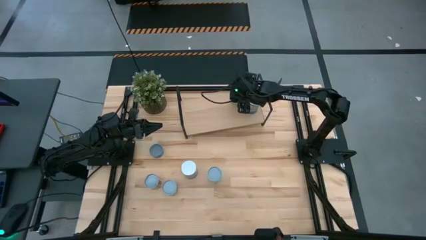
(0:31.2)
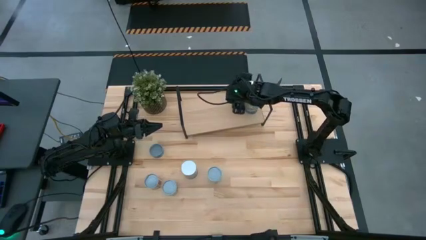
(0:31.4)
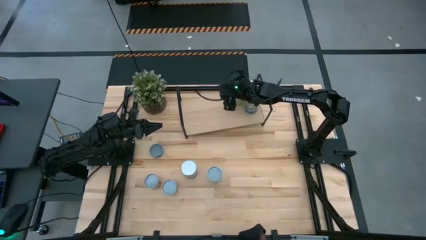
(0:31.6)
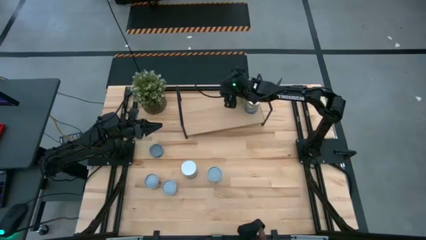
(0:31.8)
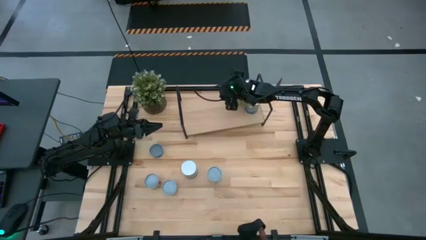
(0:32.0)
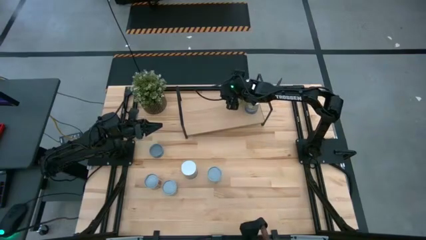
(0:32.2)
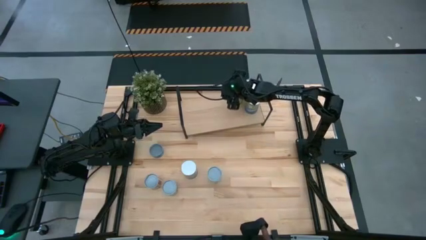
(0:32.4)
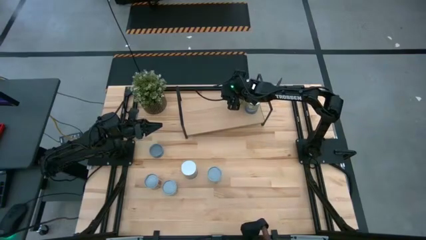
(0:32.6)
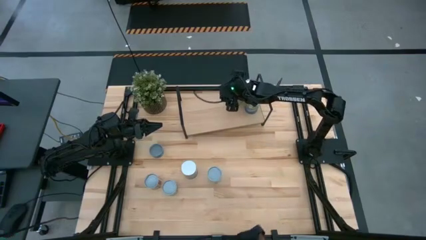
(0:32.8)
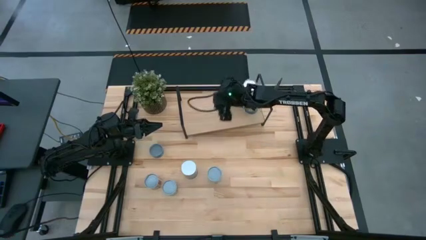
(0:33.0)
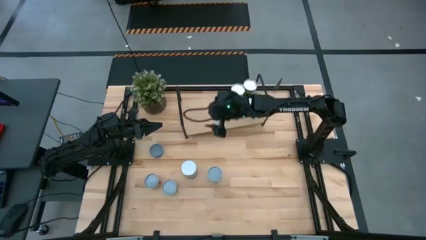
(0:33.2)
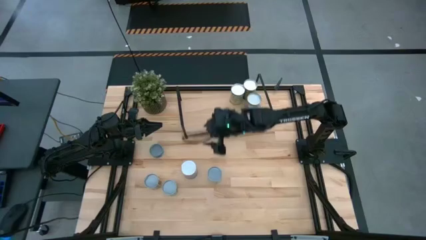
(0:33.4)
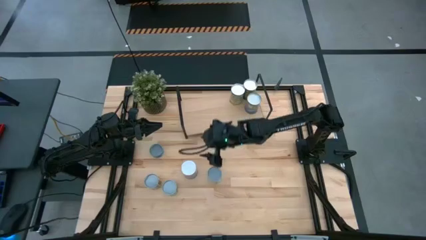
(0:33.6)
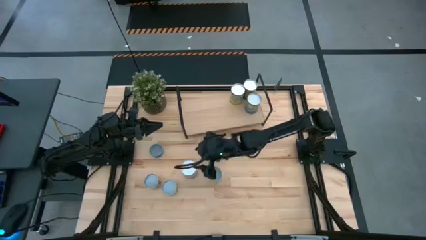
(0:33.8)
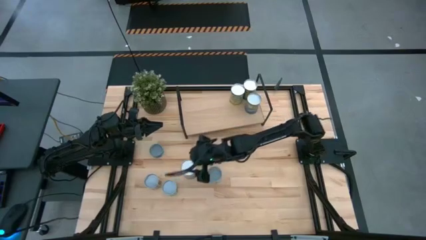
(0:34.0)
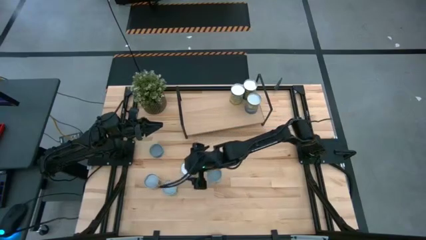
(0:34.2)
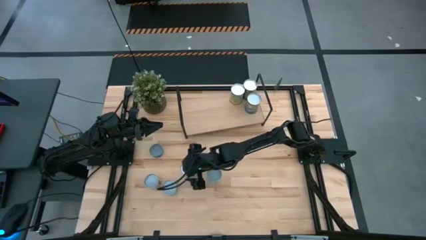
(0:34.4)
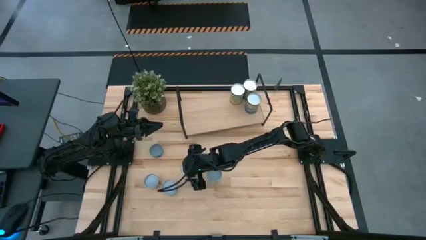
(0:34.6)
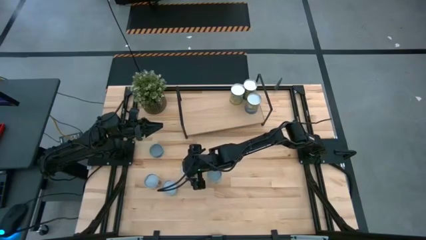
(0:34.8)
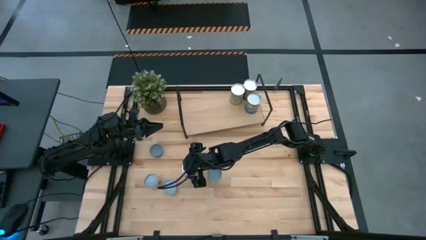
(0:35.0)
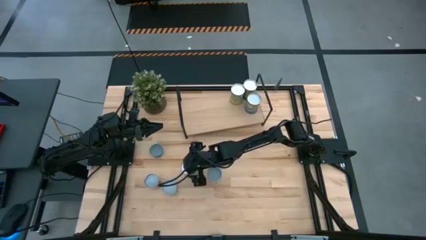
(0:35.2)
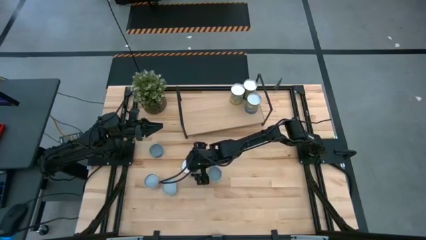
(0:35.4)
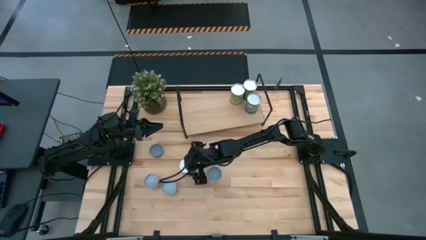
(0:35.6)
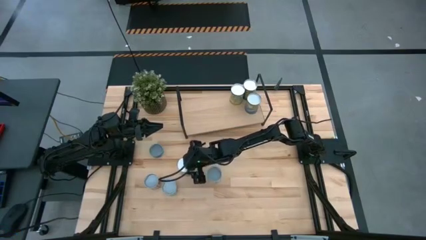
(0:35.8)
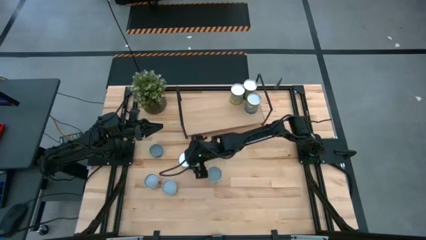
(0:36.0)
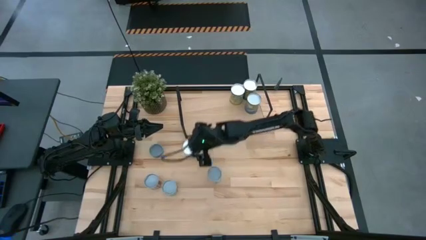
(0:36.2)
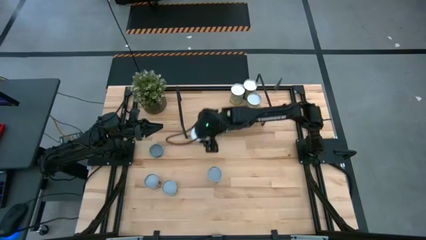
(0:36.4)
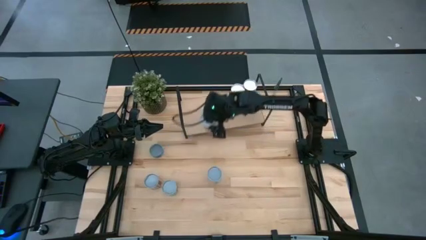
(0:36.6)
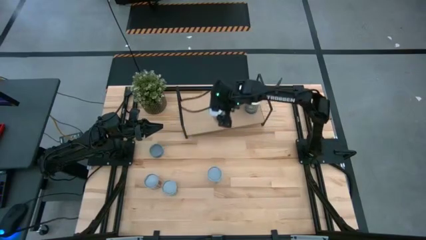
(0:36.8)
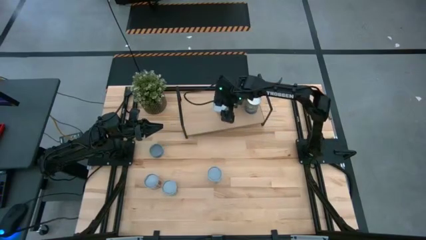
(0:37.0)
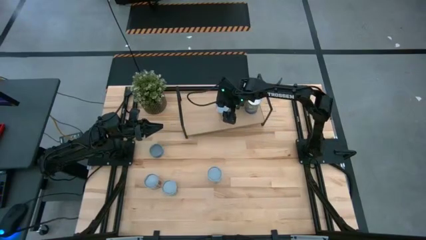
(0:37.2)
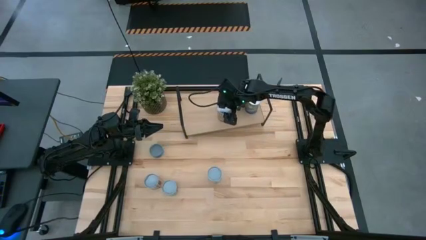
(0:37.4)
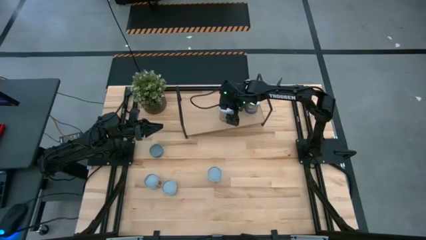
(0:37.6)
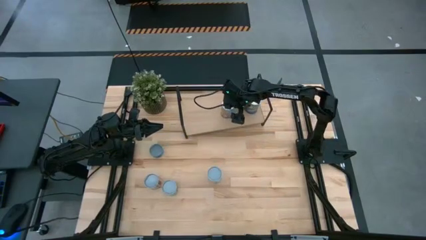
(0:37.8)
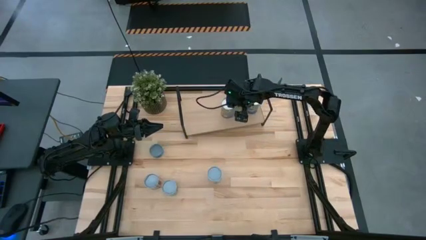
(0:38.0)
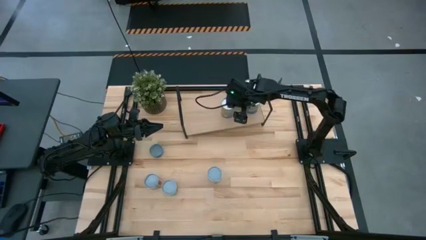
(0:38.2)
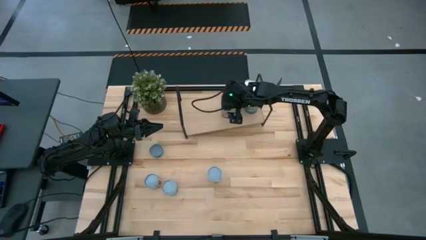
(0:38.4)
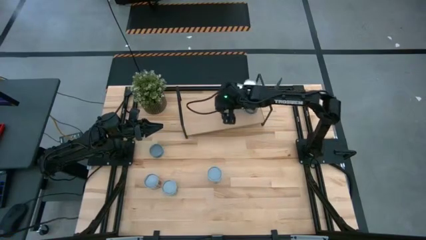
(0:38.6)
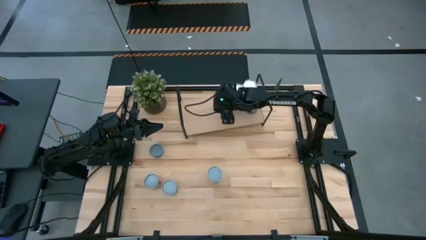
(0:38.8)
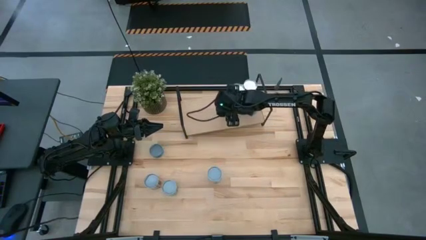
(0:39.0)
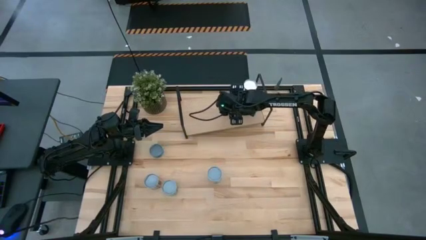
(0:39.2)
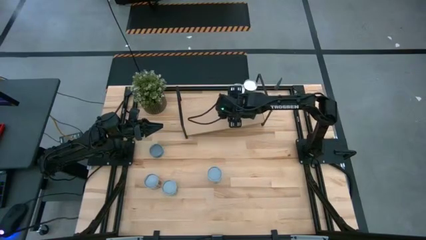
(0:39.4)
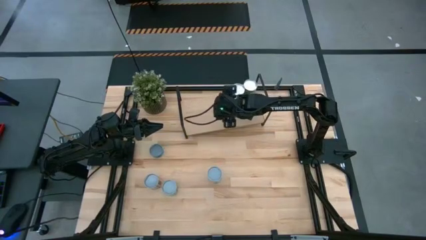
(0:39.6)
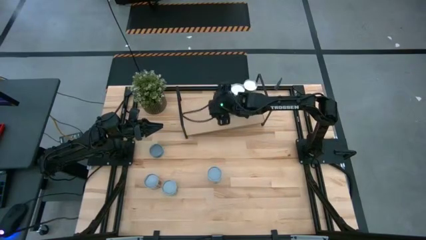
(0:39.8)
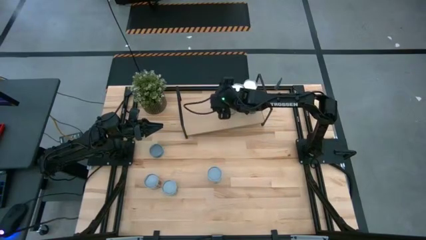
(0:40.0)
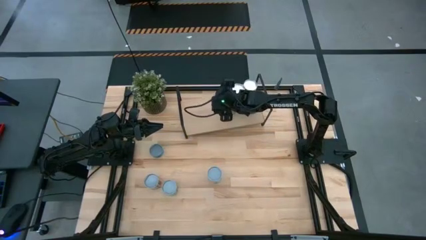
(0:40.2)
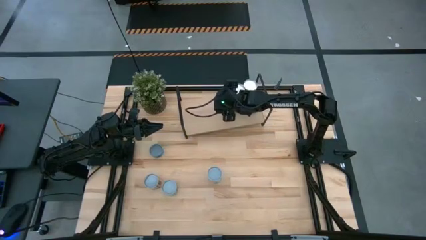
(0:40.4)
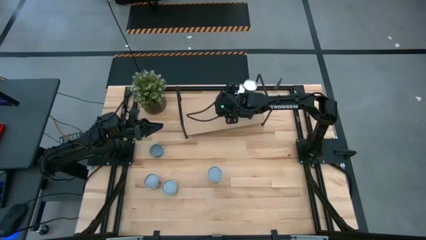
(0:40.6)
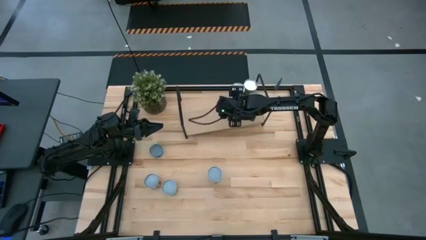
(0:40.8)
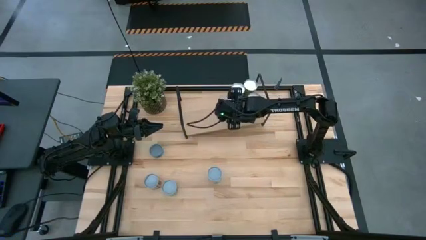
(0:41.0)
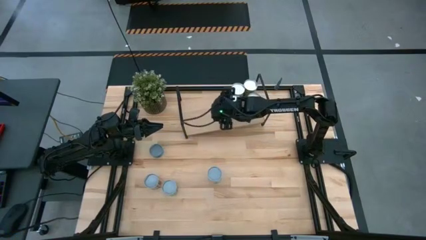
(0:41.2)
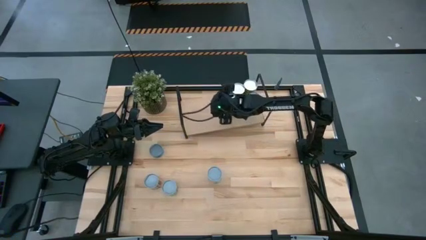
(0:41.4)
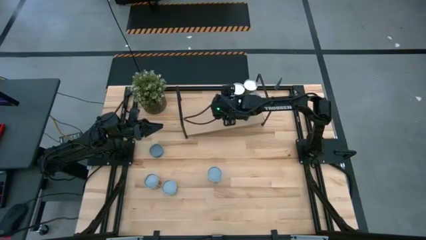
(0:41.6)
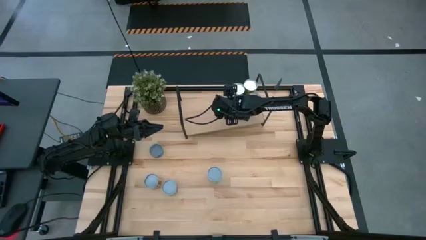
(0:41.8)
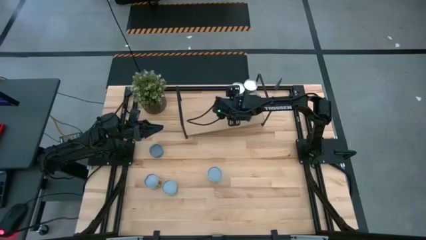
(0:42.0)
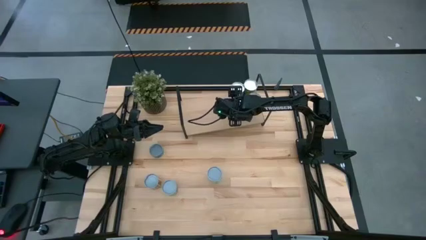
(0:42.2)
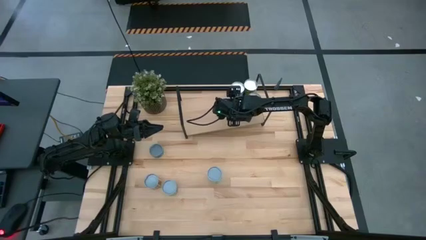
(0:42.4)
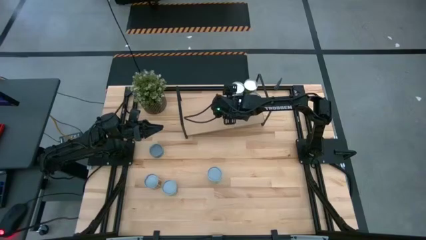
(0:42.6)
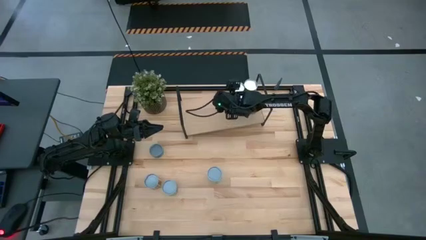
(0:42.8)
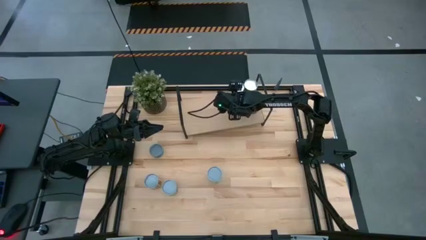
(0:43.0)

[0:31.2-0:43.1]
Task: Pick and place cans onto a shelf
Put the canned peaches on the shelf

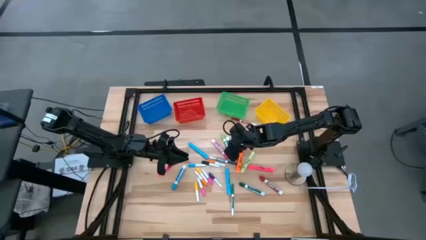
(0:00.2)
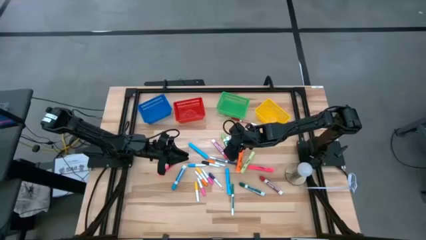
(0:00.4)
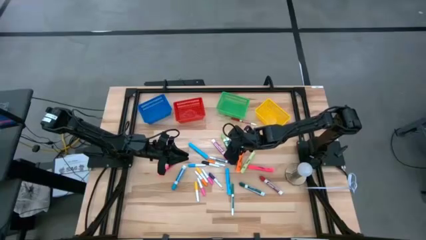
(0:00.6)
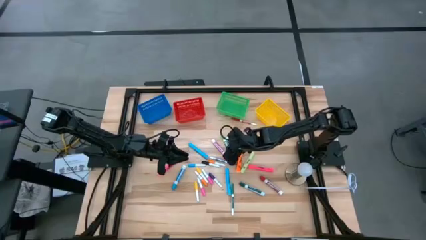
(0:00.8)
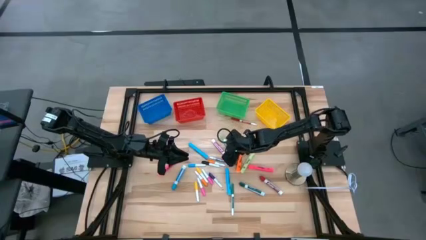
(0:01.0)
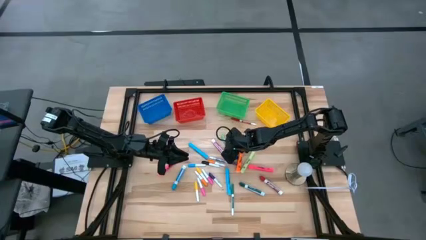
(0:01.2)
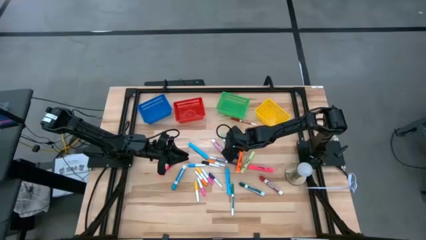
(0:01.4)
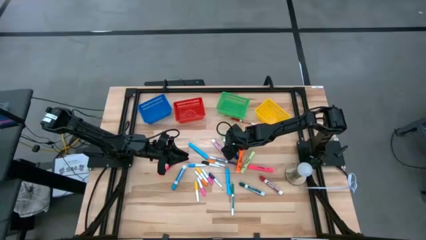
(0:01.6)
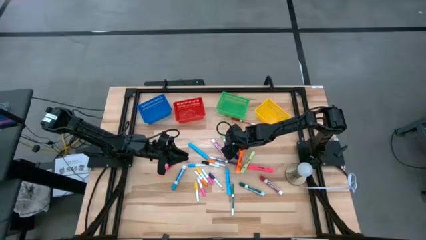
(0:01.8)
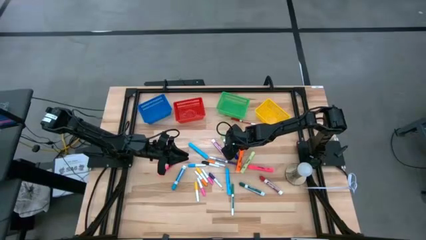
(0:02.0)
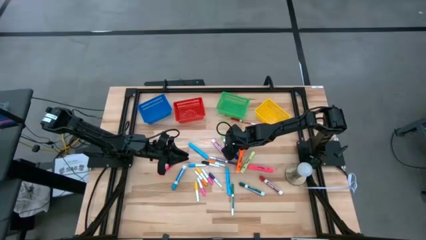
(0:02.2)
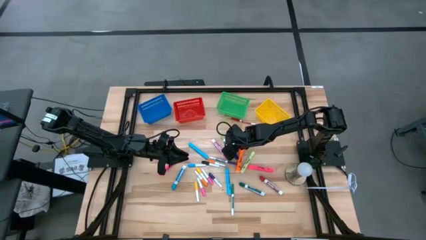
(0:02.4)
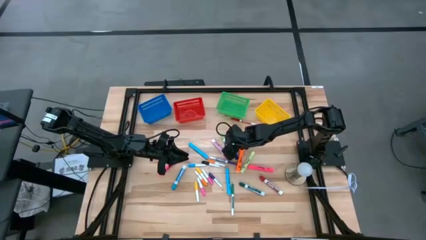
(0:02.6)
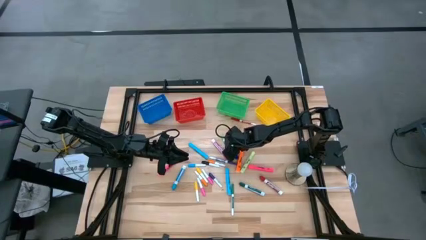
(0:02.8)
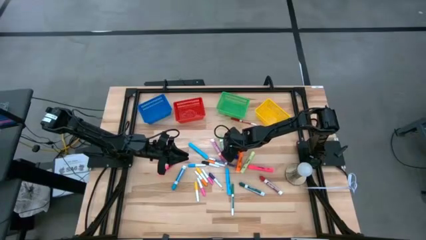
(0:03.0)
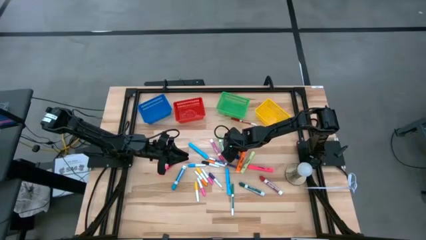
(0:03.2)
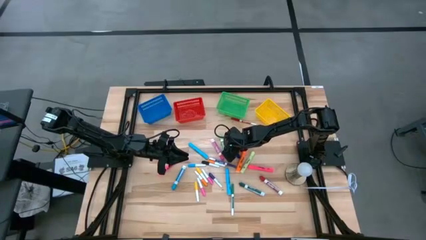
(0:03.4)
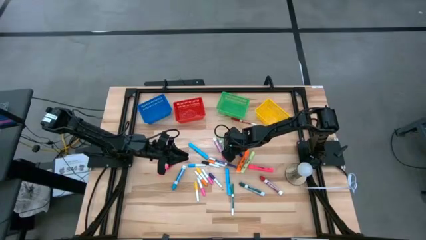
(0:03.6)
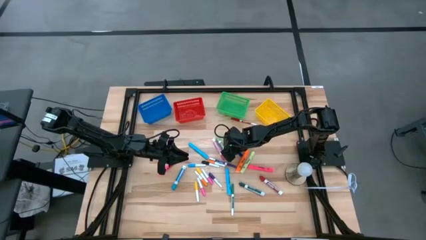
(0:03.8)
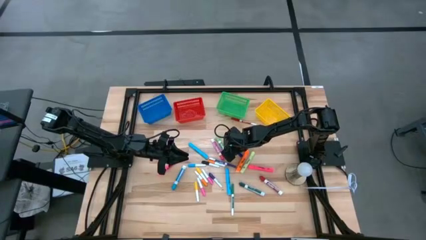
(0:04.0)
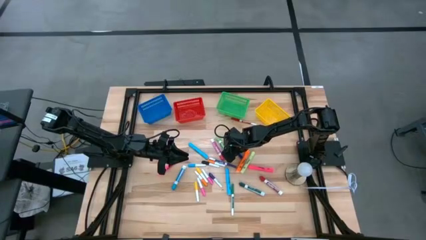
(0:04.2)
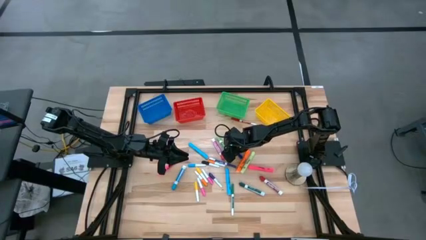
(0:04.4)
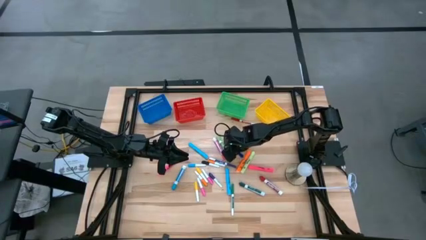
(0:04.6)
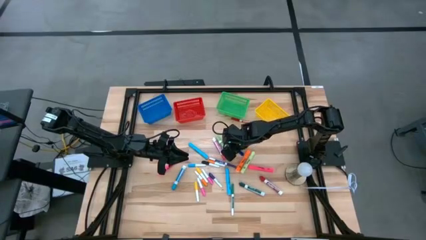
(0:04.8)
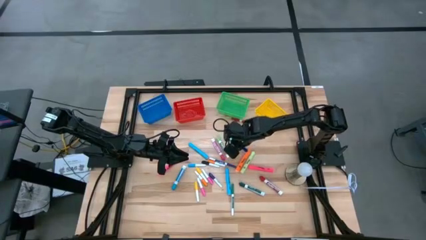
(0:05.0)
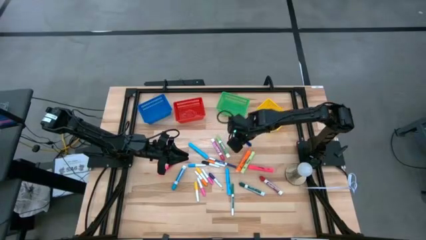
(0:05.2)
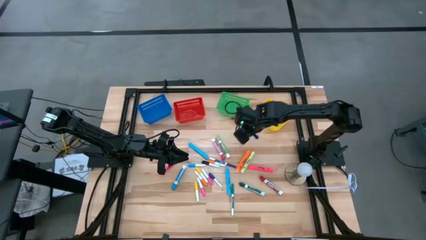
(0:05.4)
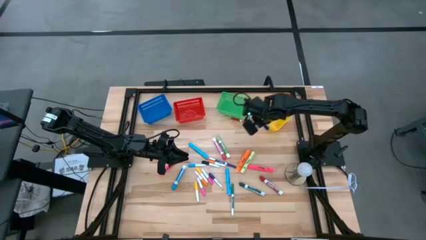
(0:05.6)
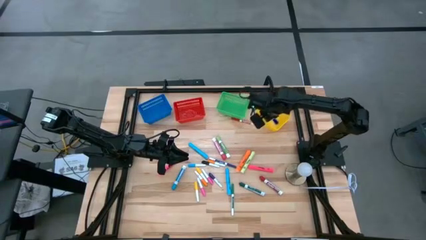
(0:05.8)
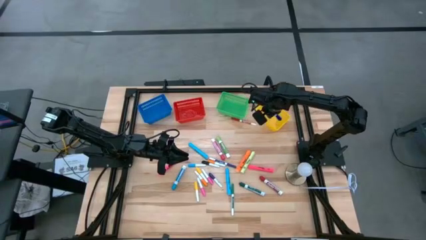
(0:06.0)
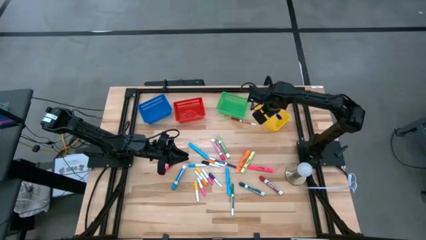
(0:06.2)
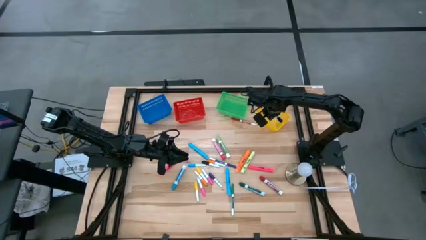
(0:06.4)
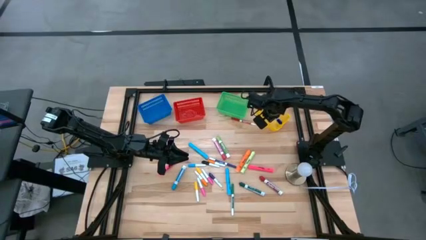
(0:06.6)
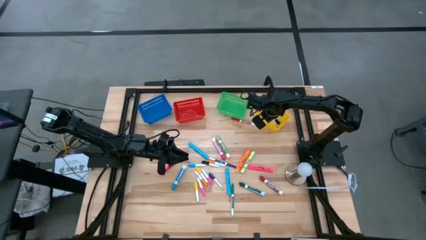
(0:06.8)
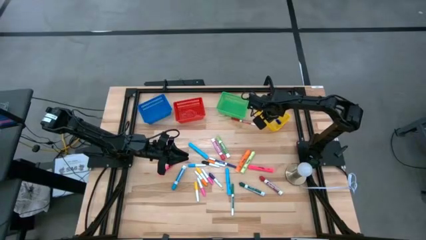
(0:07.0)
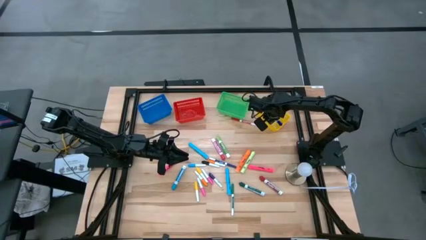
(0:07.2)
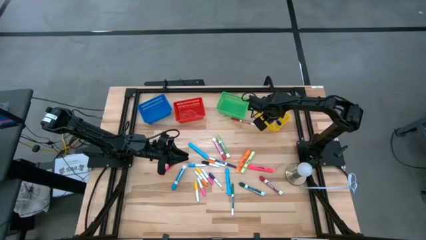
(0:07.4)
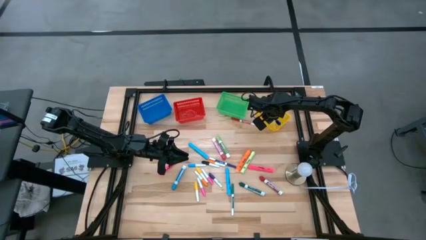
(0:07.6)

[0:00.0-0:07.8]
Task: Pick & Place Markers
Put the large blue marker pen into the yellow bin
